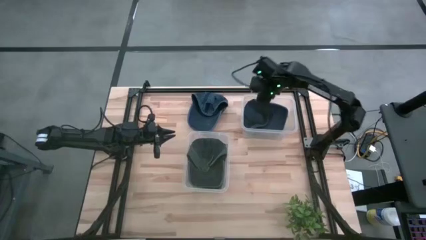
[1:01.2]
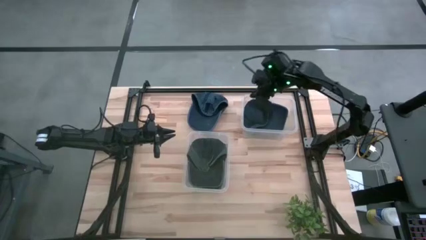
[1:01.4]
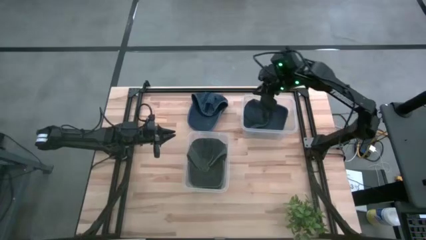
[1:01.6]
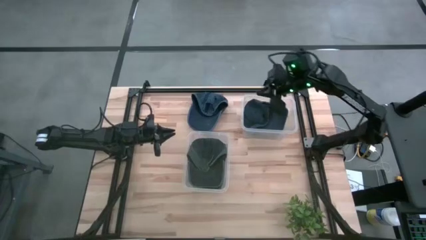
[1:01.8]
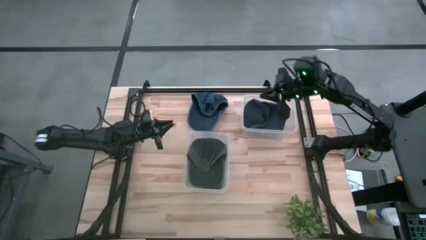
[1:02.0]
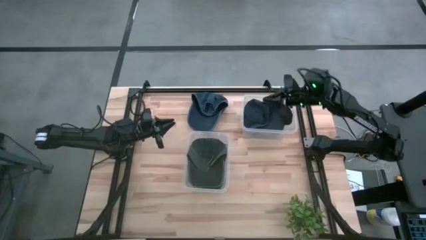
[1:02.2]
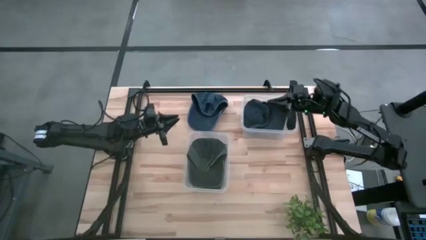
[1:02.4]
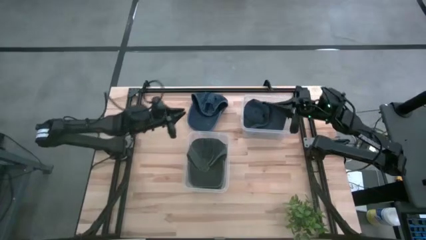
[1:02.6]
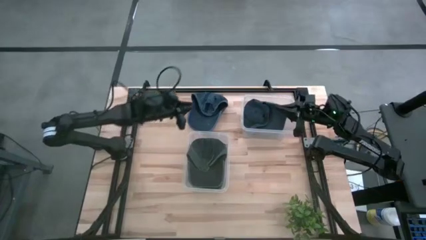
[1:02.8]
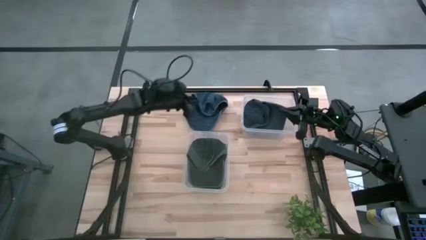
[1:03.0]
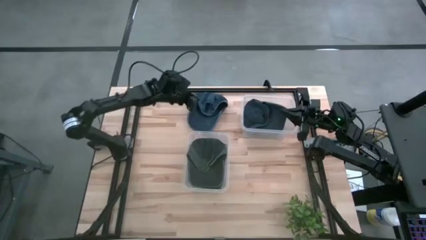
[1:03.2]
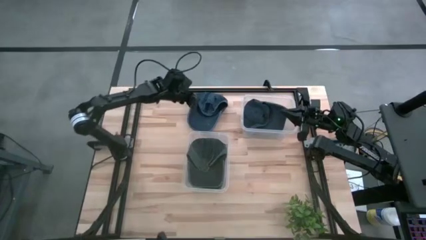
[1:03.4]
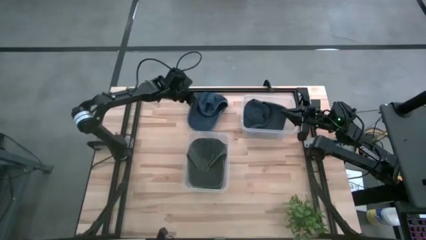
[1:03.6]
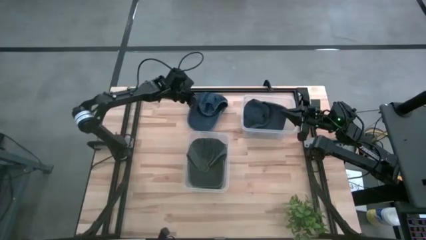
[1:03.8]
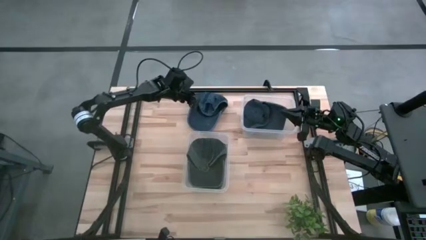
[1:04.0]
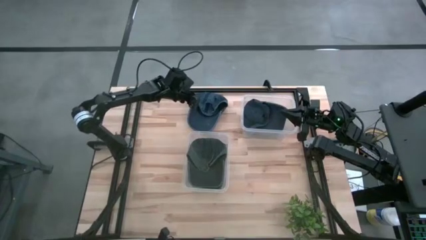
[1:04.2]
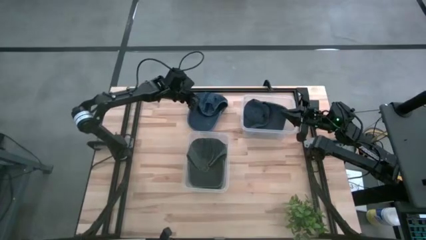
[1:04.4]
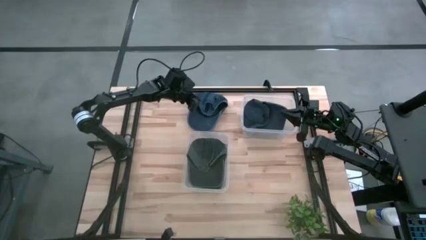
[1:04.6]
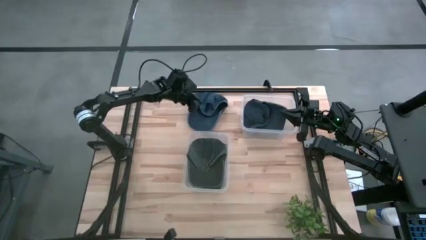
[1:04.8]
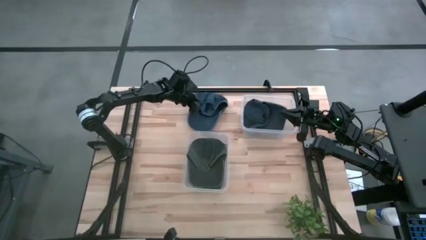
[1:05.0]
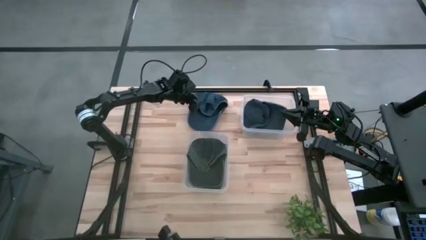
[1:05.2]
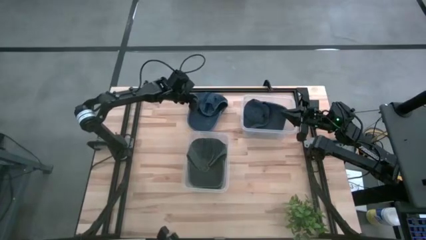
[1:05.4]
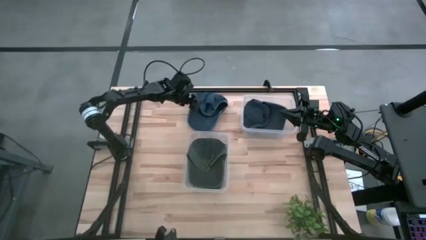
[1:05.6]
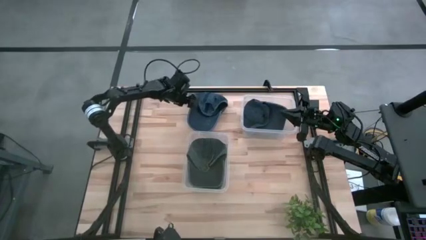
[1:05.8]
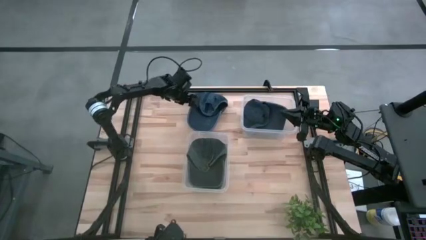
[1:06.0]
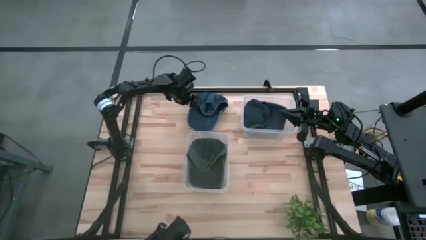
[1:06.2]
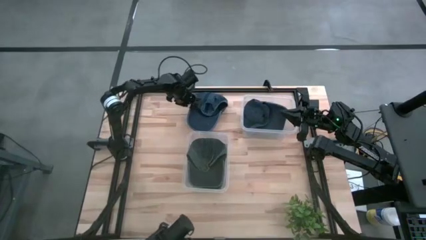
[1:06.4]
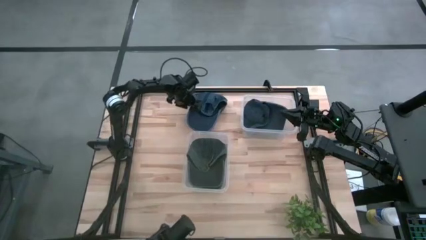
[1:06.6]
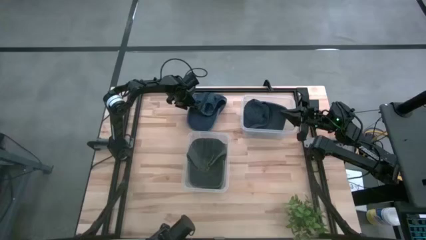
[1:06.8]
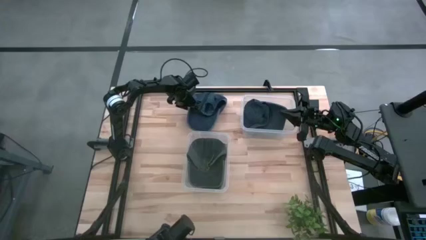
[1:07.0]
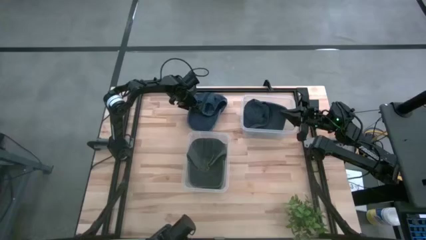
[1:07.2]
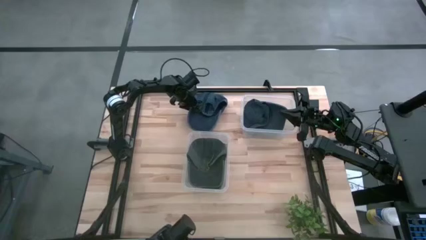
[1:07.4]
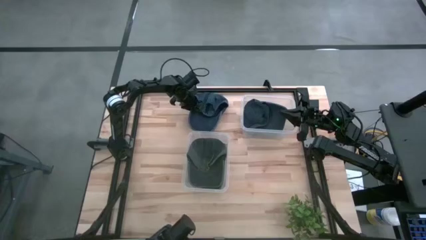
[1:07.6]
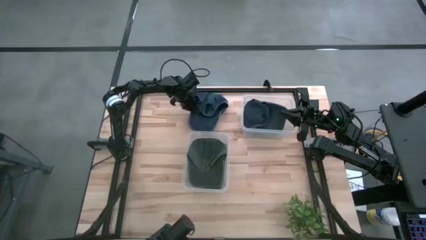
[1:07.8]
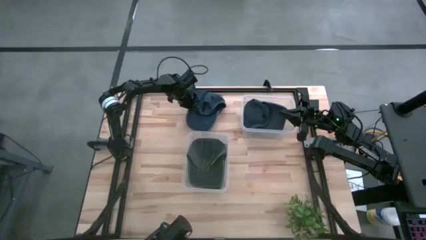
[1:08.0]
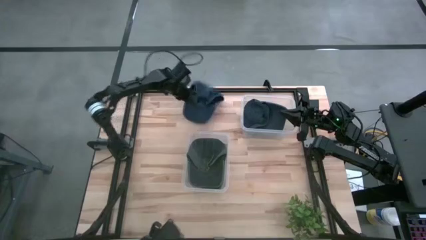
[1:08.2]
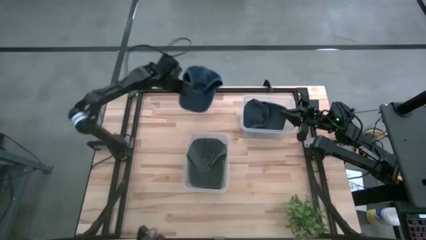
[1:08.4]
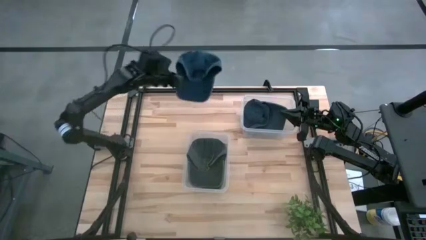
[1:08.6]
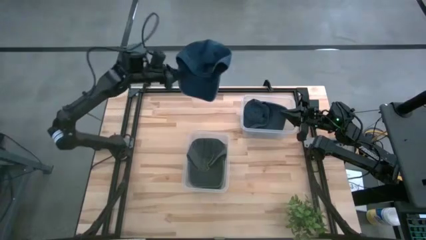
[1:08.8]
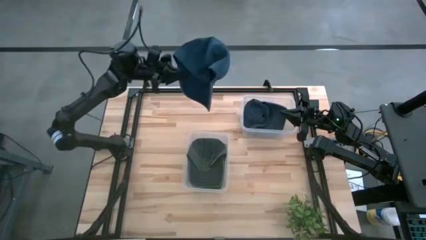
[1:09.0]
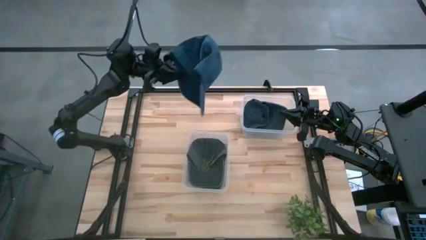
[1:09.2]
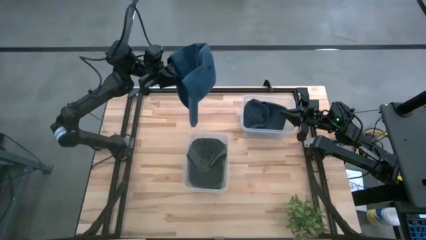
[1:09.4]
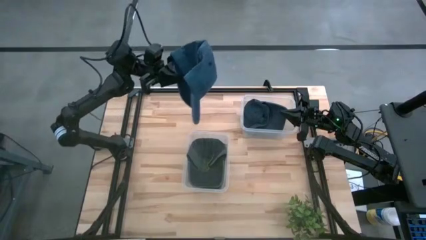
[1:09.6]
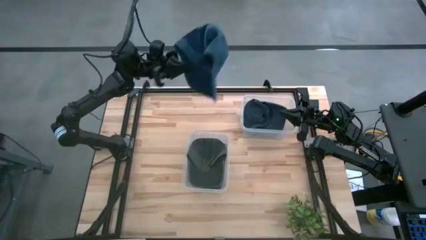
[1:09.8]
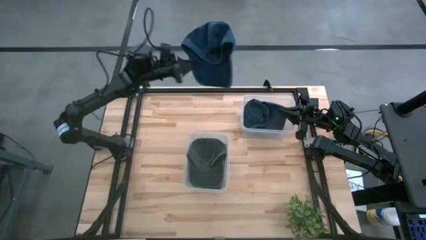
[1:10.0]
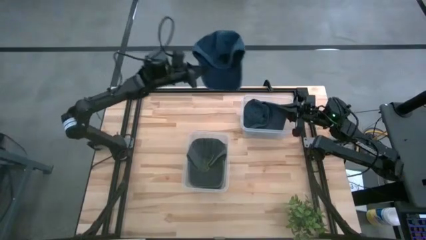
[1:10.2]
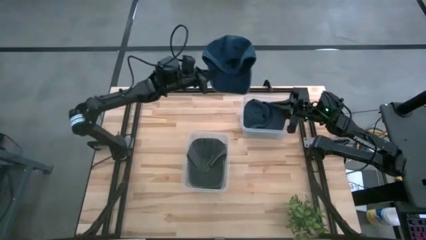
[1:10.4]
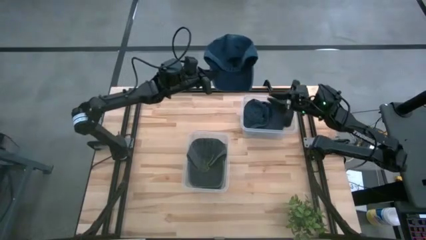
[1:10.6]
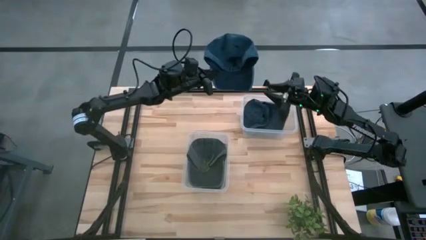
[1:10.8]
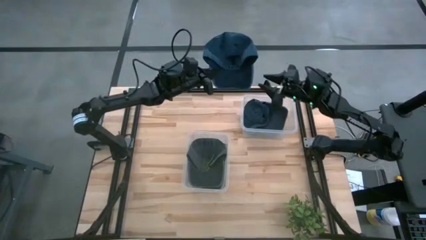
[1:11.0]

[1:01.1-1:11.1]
Task: Pick & Place hat
Put the blue cap into the top transparent bin

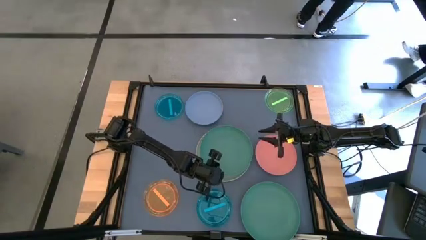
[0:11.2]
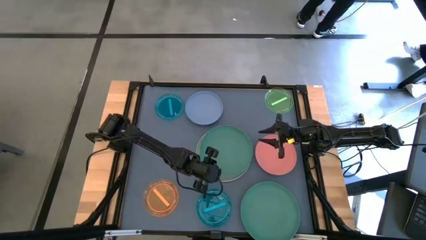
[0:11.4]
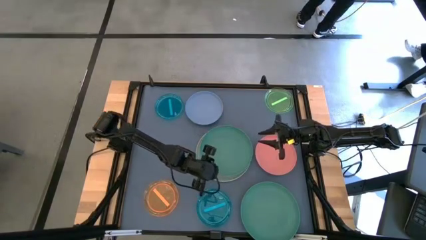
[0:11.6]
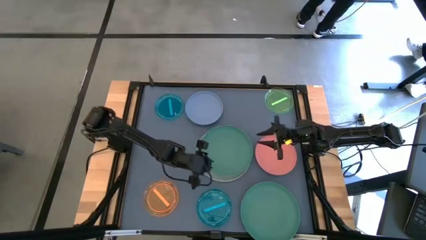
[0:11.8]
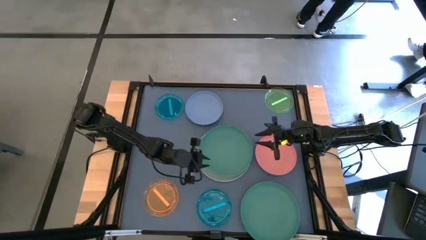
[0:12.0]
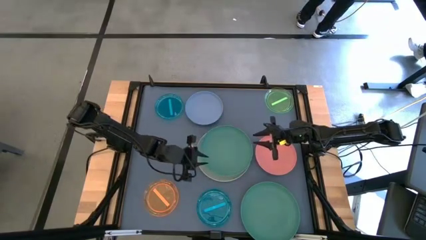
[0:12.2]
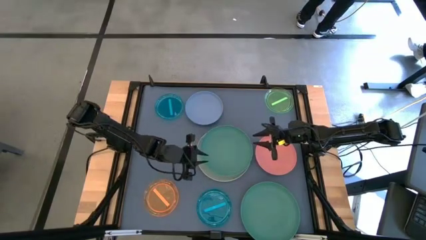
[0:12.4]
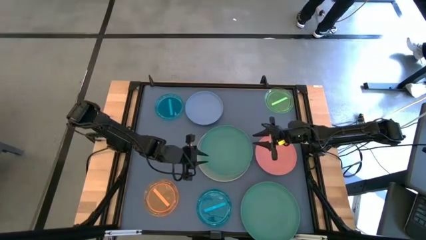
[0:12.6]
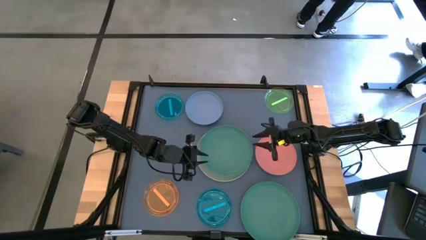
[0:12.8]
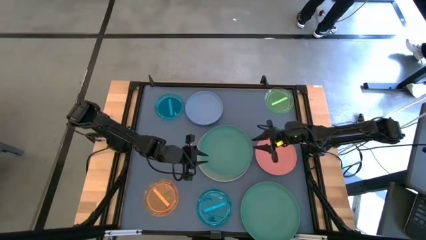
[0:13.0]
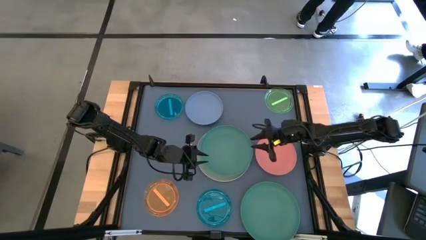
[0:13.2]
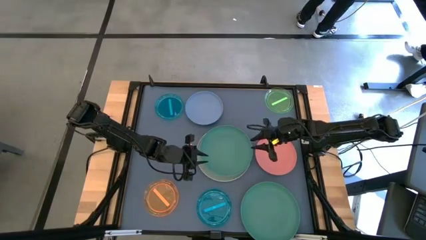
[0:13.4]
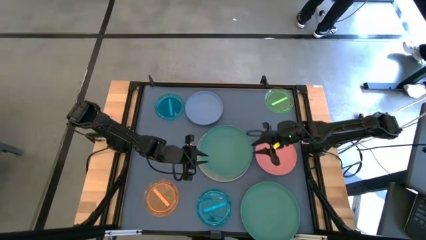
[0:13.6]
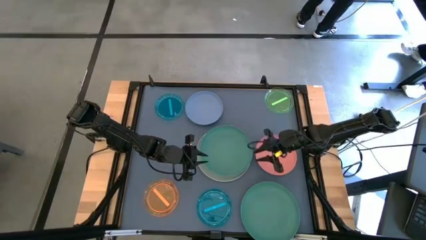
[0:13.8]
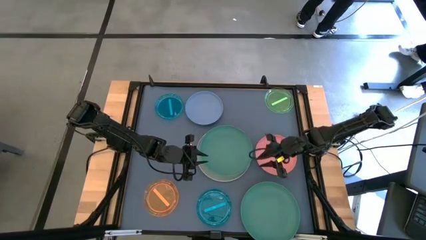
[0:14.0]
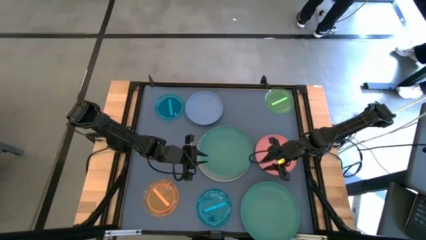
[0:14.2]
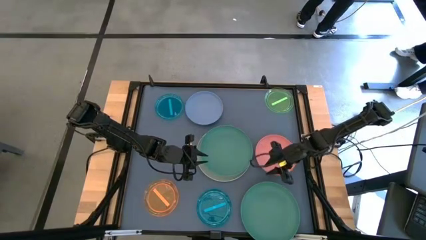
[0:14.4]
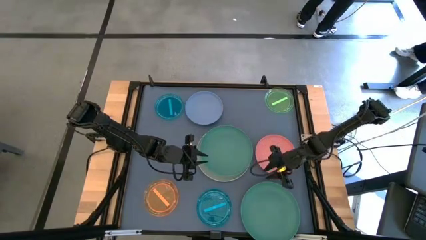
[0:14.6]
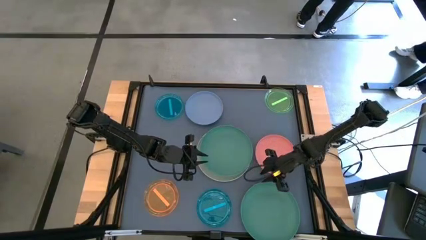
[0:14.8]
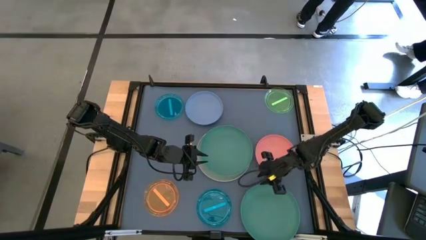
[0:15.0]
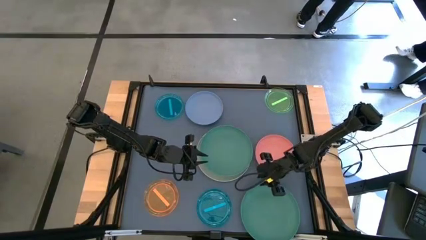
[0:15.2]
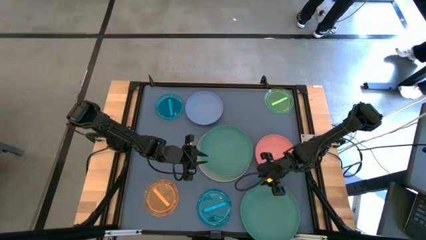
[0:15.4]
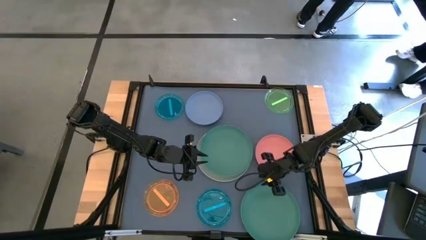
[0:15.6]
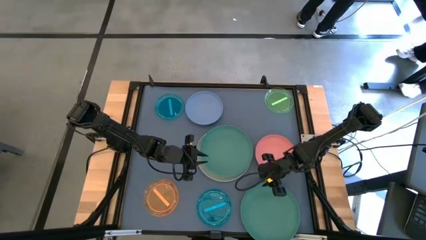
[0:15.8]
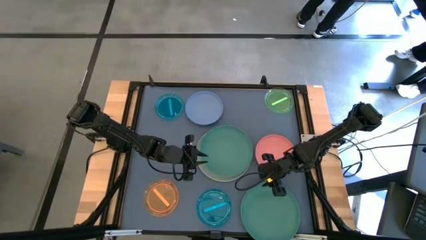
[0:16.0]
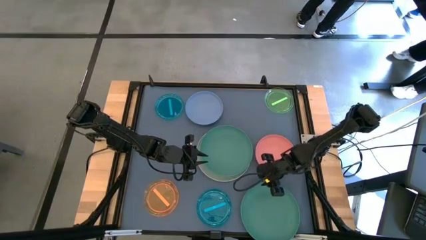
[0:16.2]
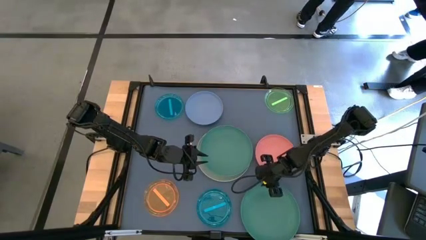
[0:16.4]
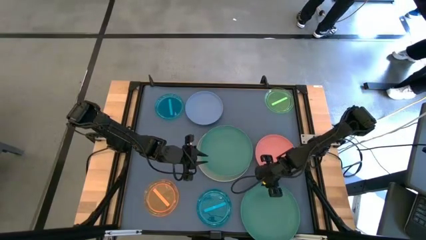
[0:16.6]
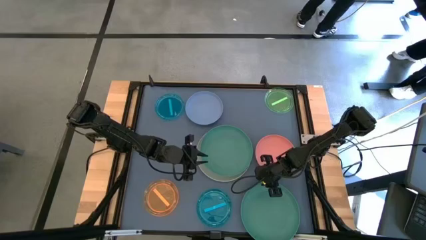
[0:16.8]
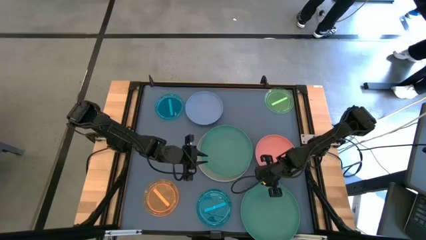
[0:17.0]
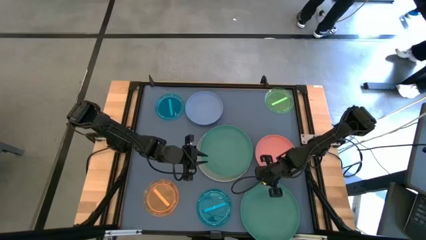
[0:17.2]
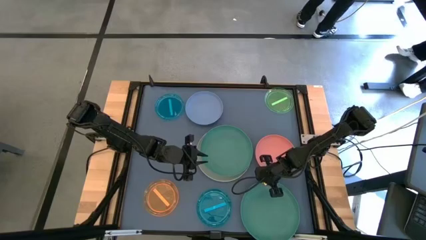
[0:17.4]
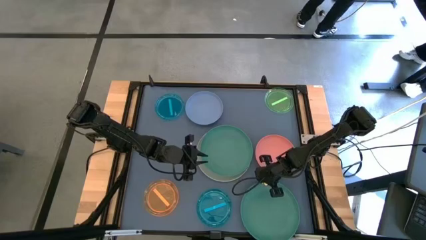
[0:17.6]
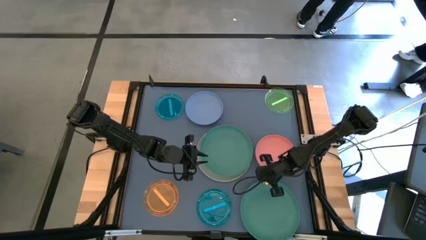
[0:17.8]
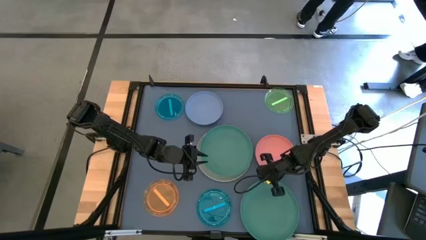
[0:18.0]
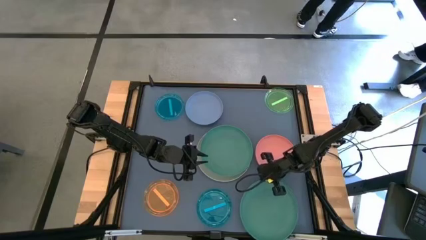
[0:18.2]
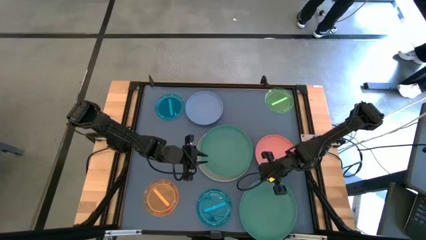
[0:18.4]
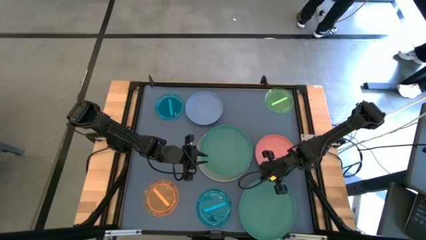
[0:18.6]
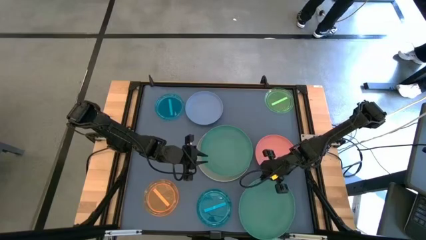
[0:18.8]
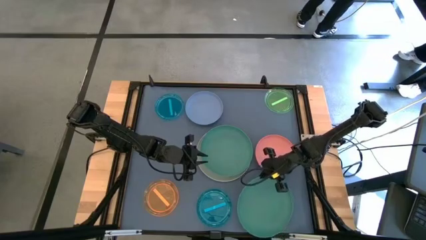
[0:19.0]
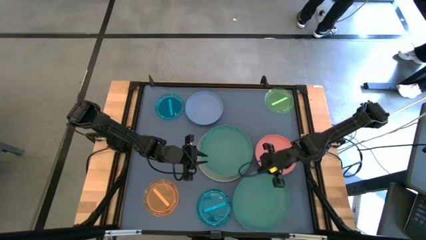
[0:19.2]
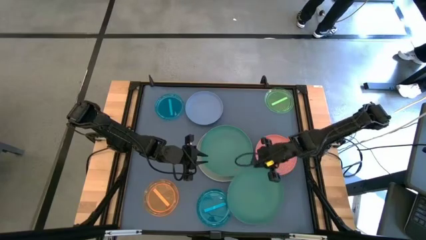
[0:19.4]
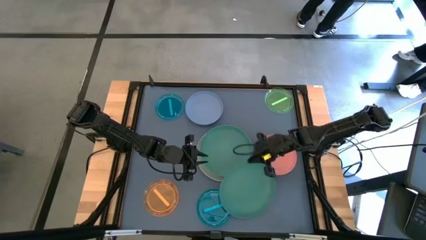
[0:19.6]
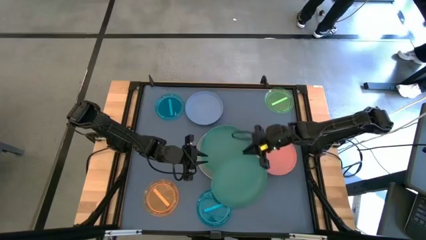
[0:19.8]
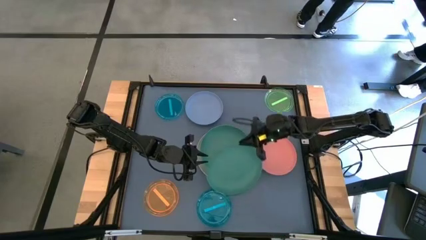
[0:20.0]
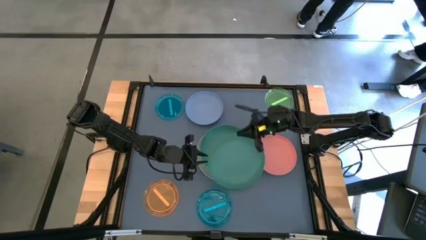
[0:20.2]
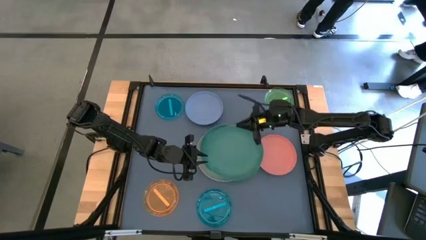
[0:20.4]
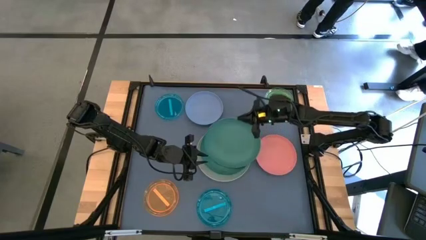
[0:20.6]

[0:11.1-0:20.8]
Task: Stack plastic plates
Stack the green plate on top of the green plate
